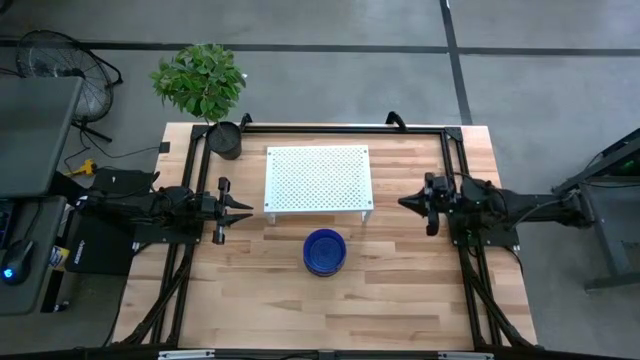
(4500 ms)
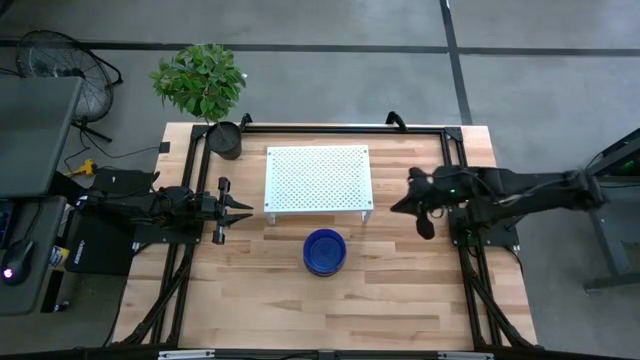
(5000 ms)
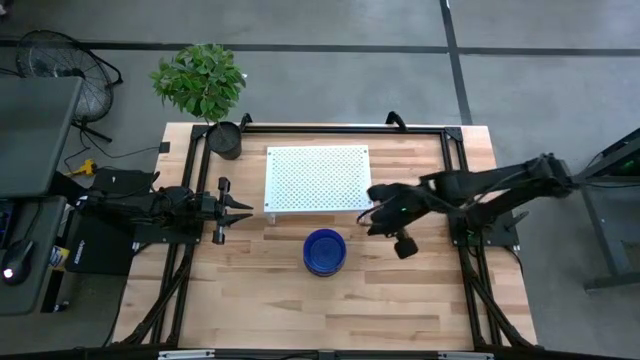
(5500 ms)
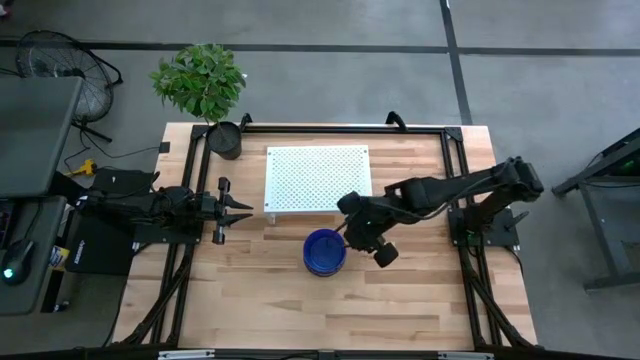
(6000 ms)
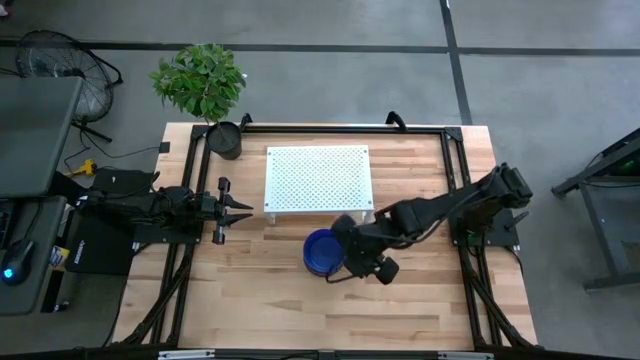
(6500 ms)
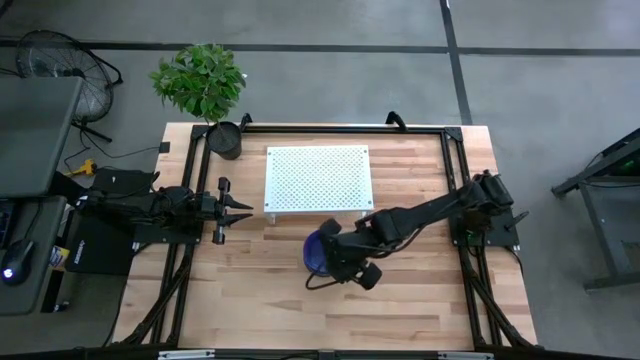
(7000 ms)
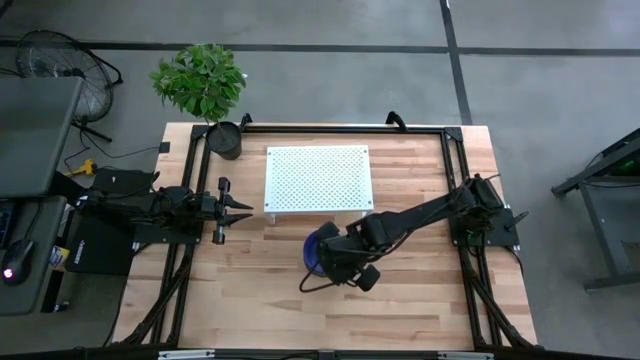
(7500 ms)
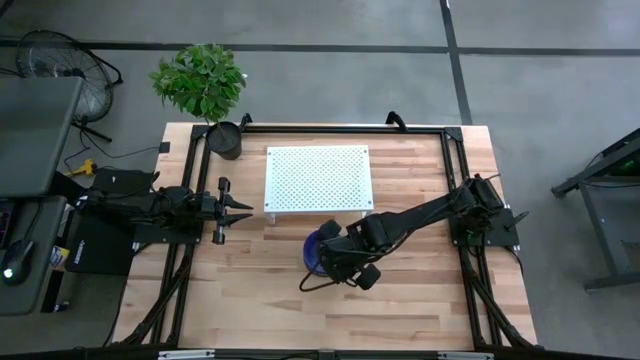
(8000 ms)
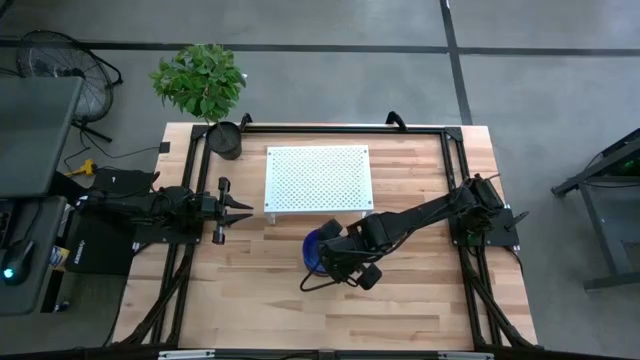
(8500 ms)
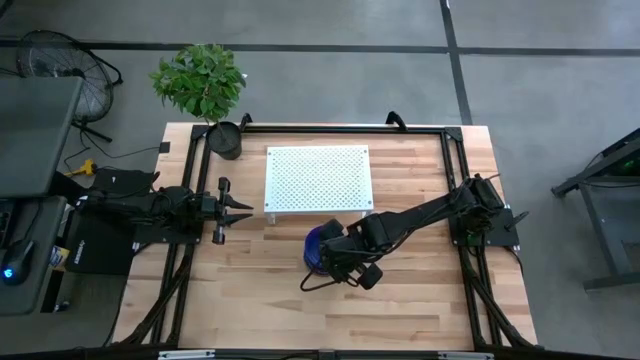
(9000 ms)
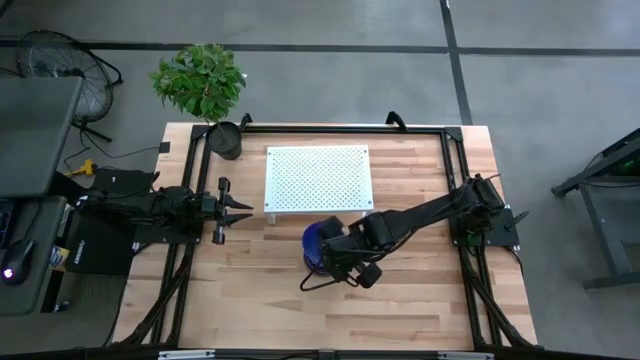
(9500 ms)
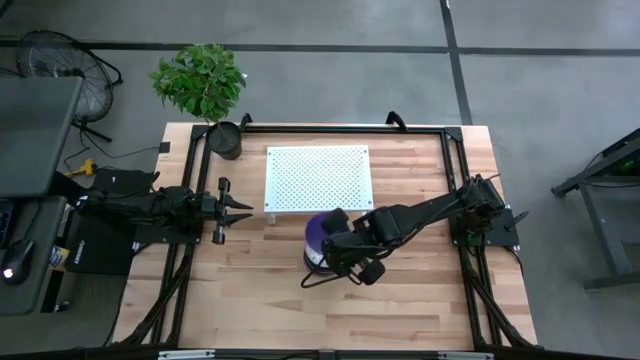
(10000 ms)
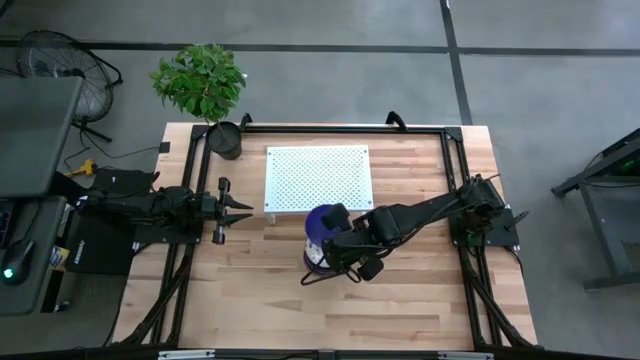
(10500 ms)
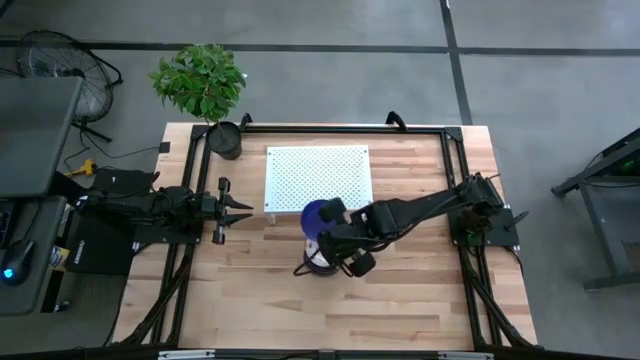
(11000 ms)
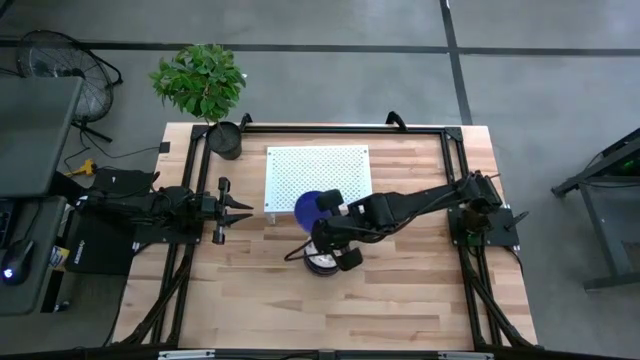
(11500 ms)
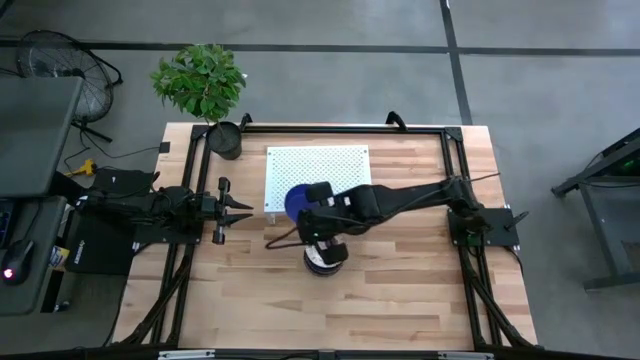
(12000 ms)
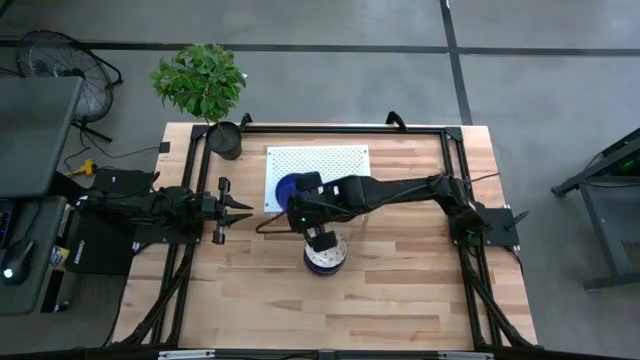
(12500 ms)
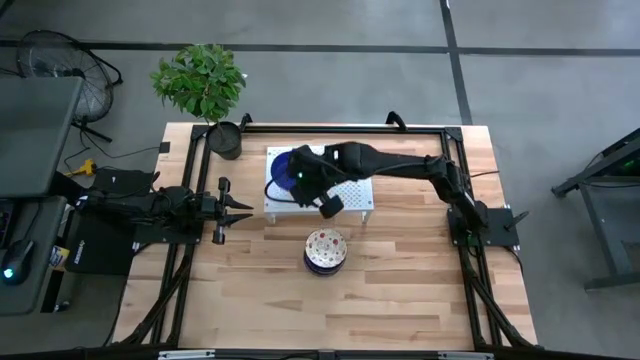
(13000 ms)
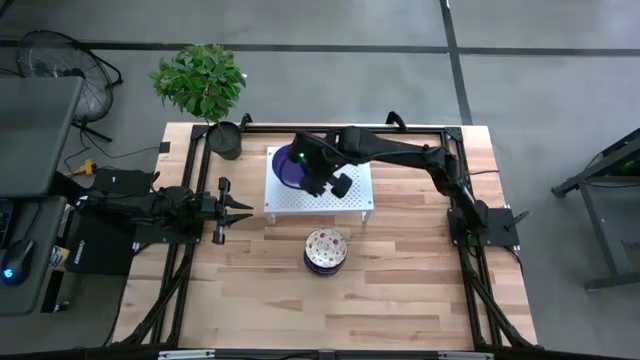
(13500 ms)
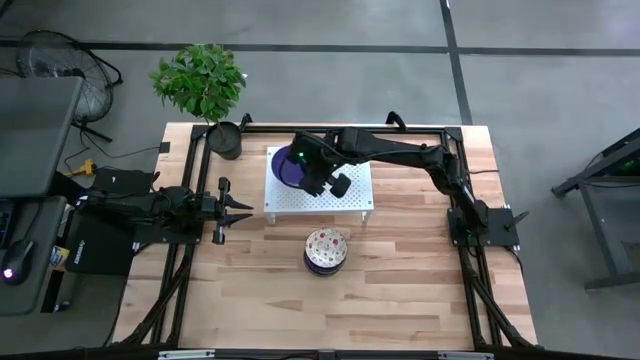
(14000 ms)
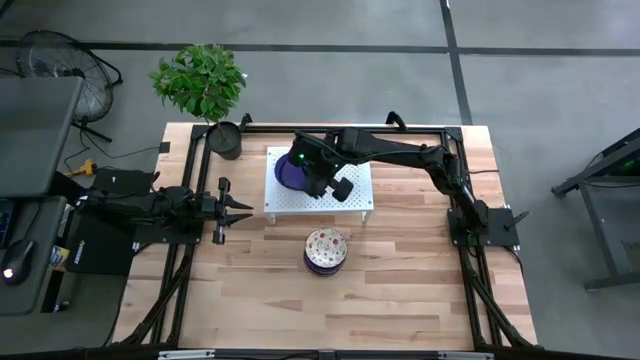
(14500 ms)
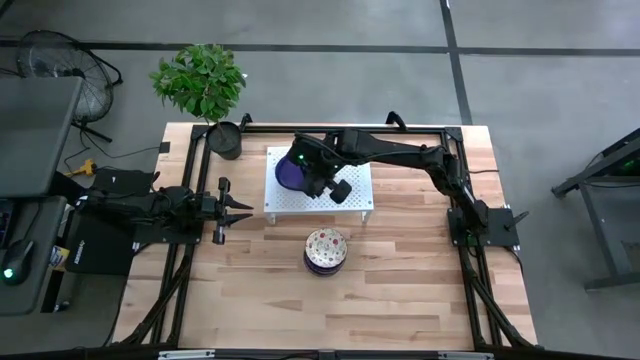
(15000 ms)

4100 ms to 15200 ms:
Task: Pick & Place Mini bowls
Put the violet bowl on the shelf

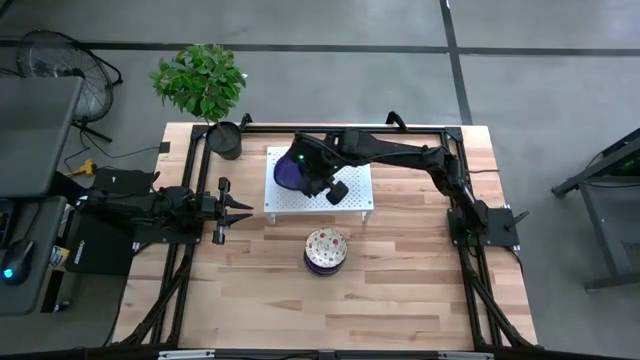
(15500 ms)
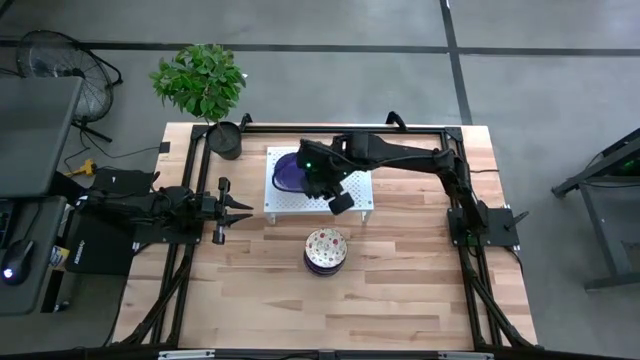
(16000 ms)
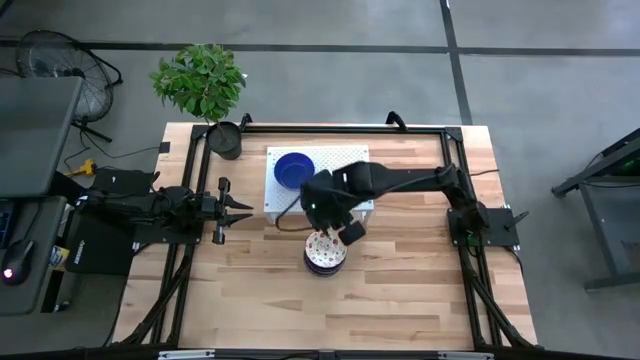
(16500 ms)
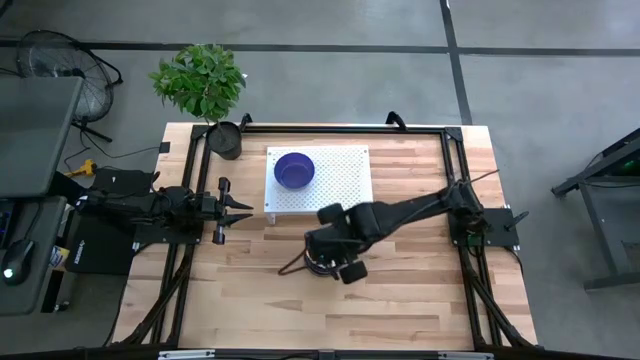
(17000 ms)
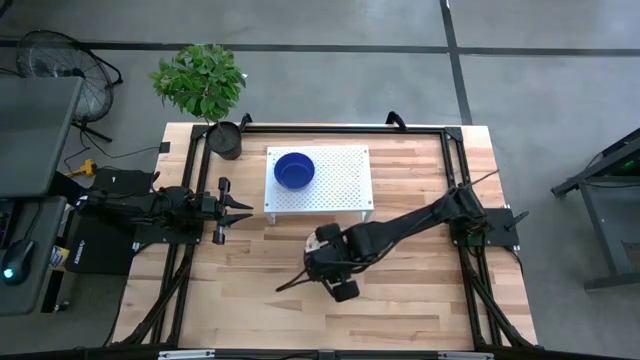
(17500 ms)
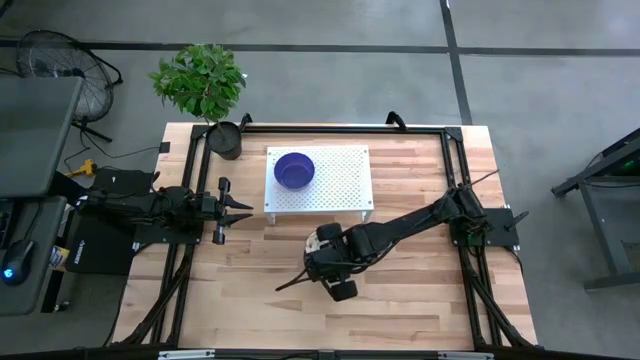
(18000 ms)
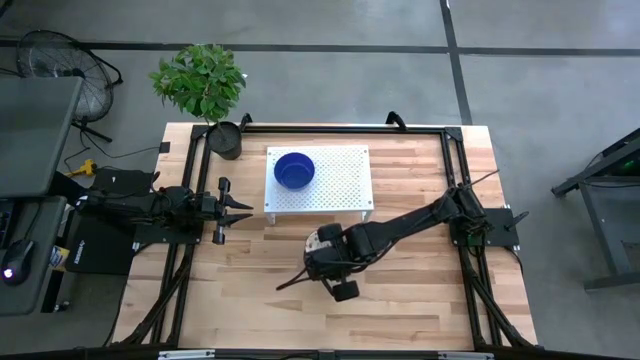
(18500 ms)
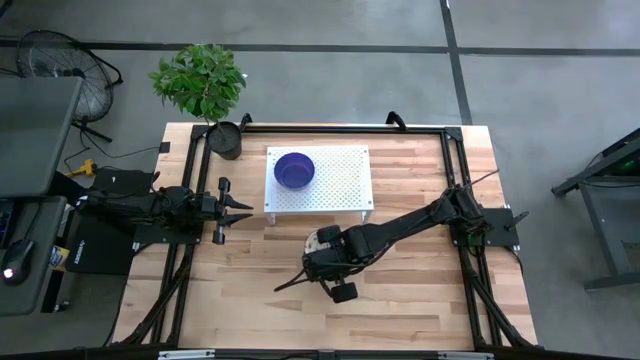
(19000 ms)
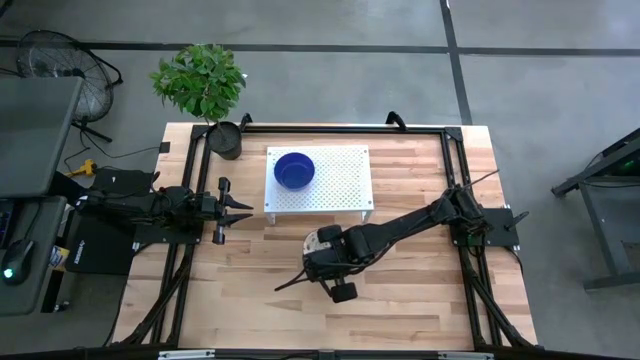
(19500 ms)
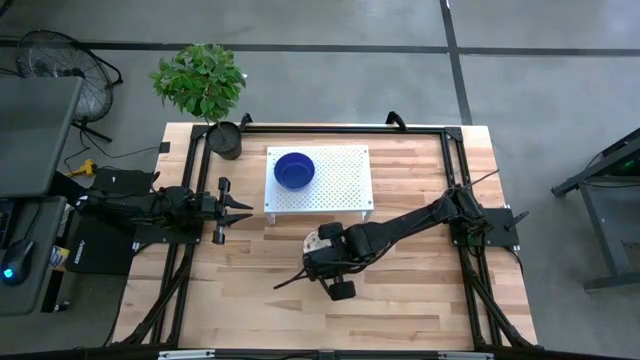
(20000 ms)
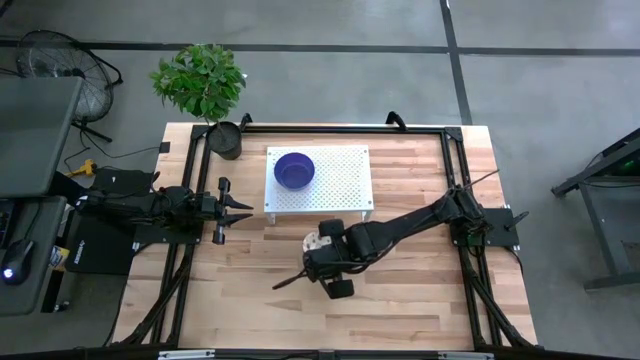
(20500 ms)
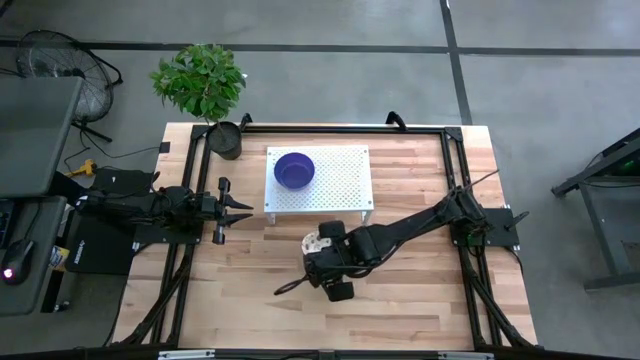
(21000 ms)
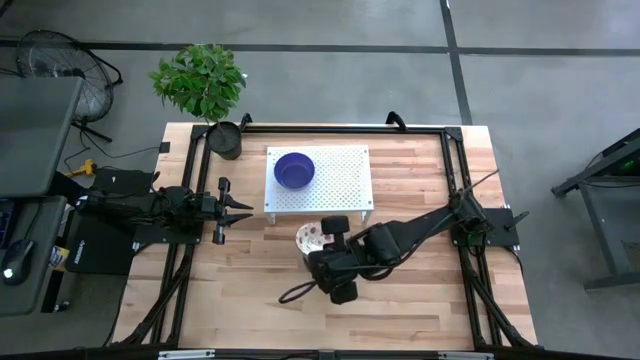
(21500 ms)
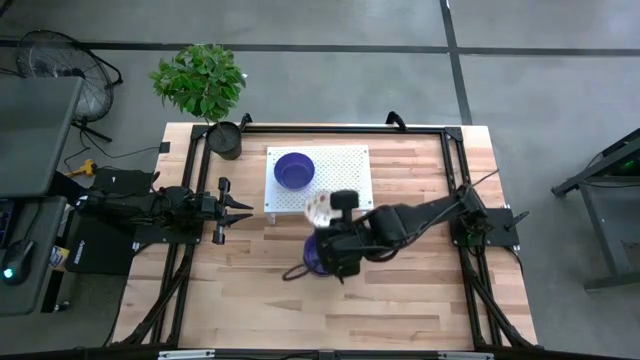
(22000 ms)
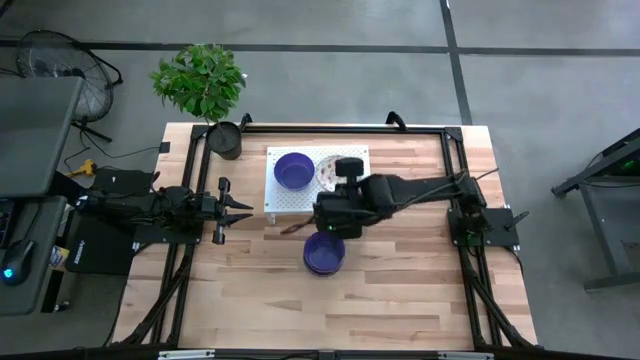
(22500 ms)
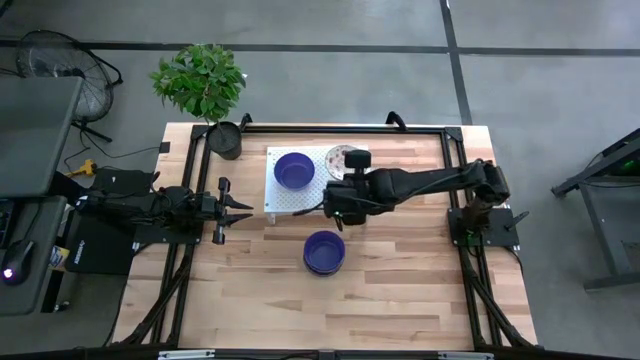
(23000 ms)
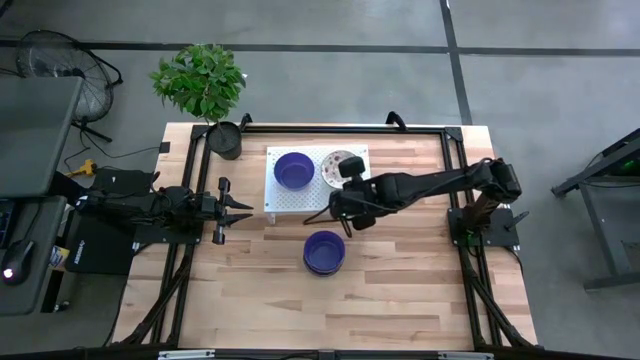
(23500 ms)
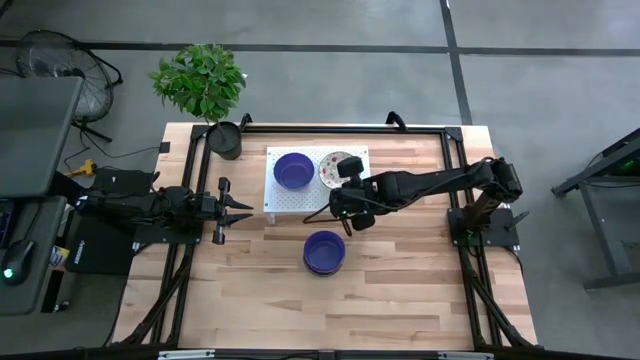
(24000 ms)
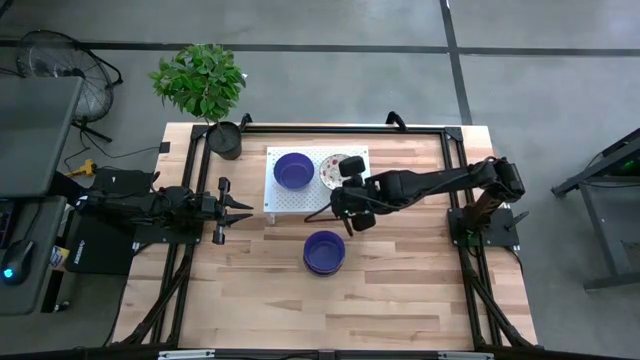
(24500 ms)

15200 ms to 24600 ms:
Put the red patterned bowl on the shelf
